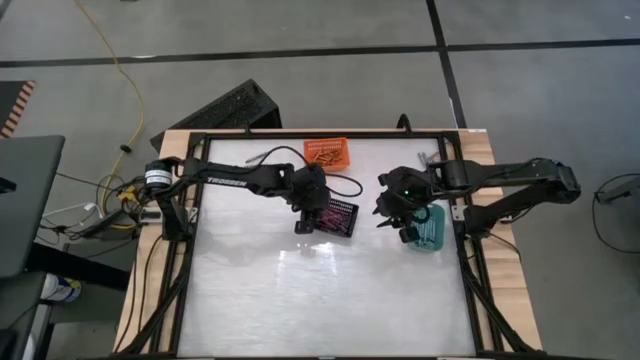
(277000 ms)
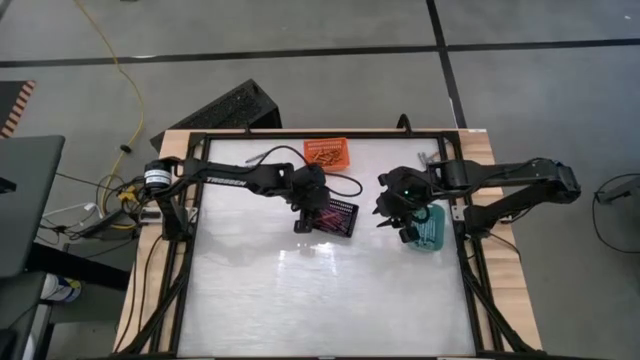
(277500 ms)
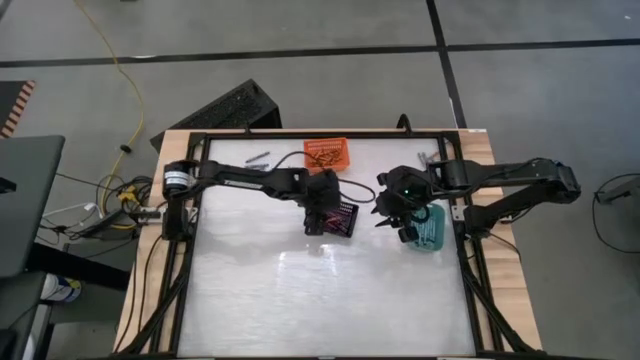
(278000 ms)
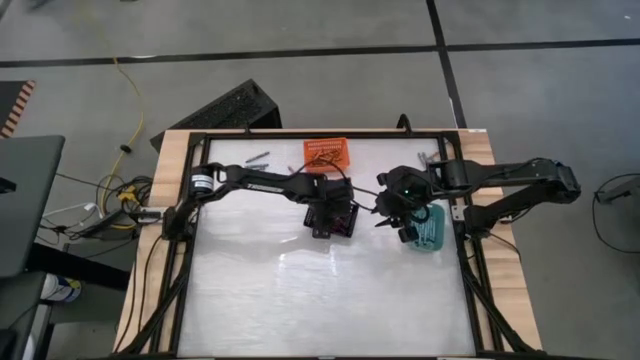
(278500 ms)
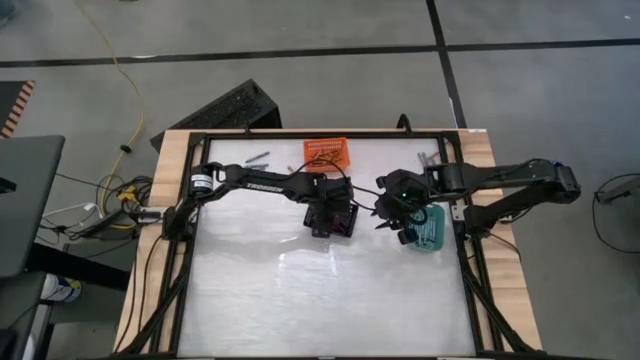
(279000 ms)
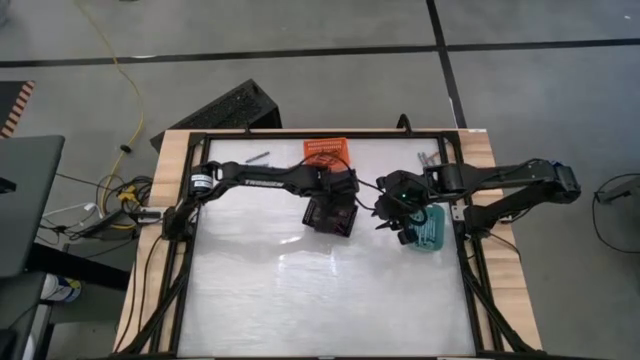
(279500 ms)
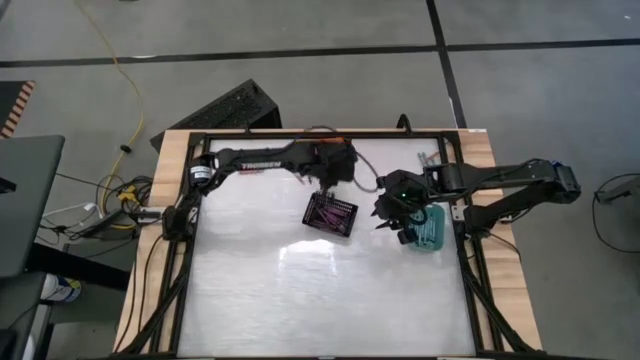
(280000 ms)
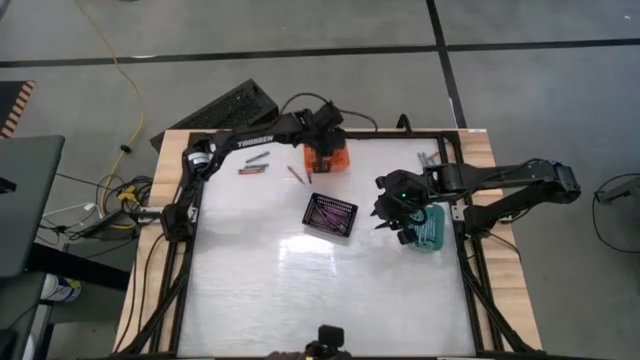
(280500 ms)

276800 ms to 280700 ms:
Task: Sort crayons
Put the orange crayon into the orange bin

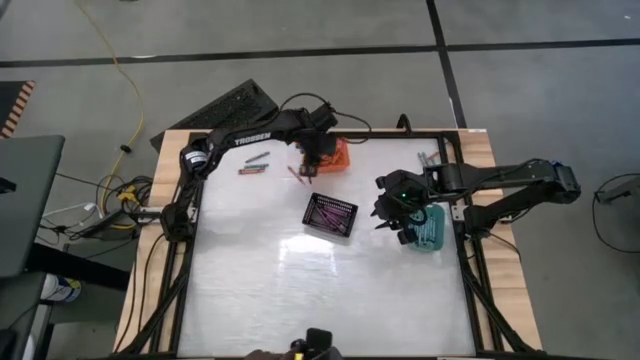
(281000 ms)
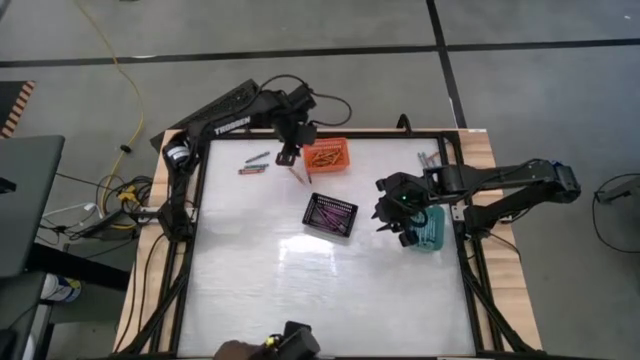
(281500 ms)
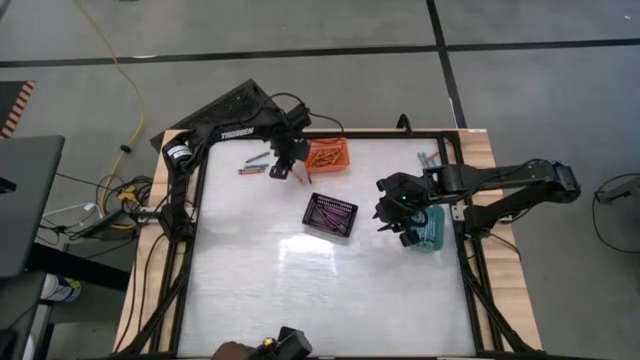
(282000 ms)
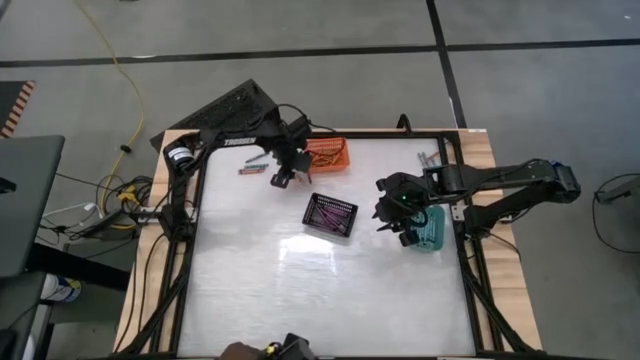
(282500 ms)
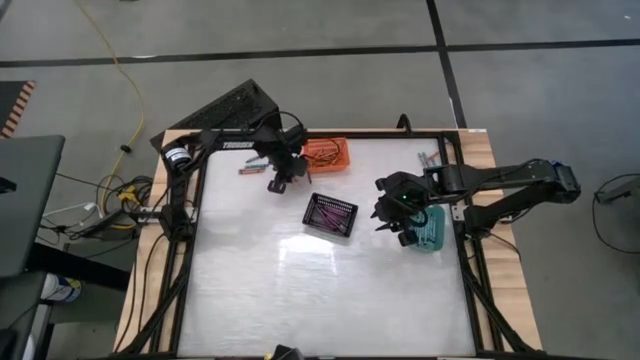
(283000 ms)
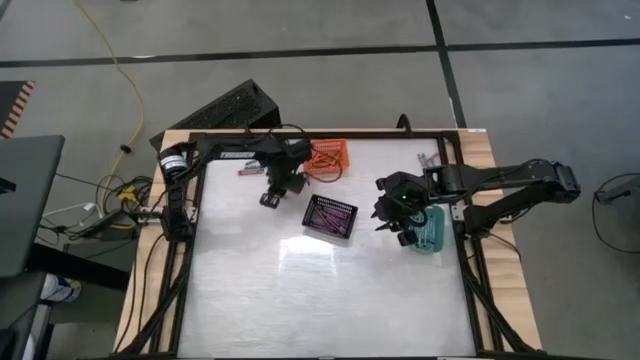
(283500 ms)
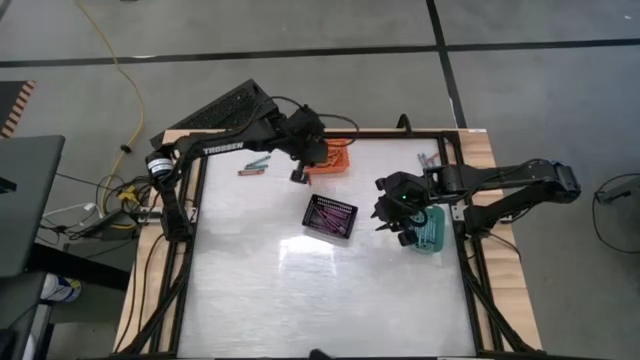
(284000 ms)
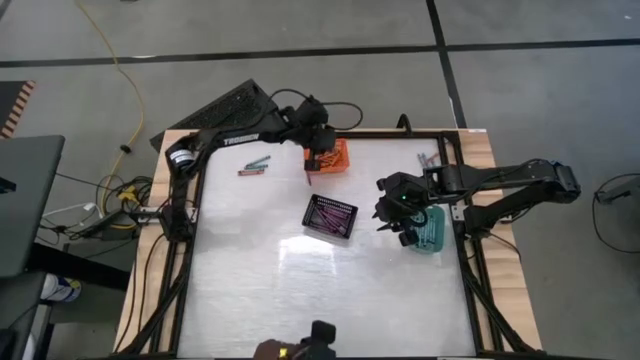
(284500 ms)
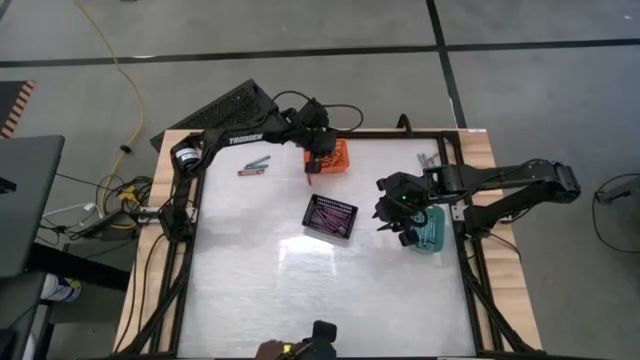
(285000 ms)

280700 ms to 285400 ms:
Put the orange crayon into the orange bin

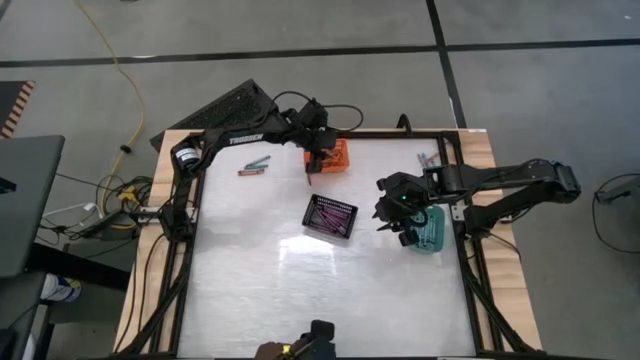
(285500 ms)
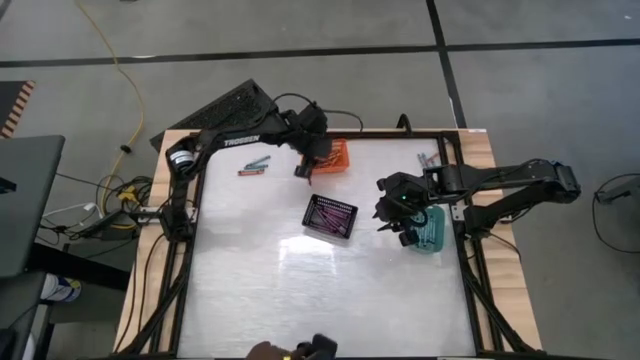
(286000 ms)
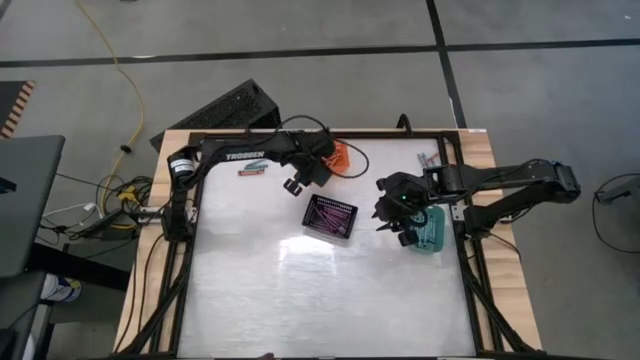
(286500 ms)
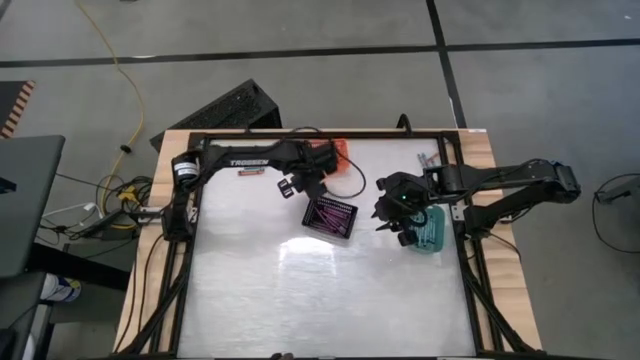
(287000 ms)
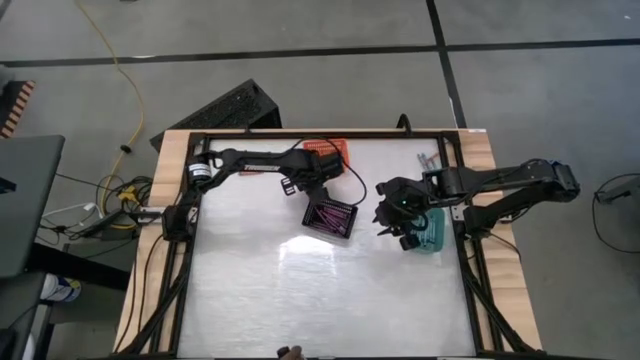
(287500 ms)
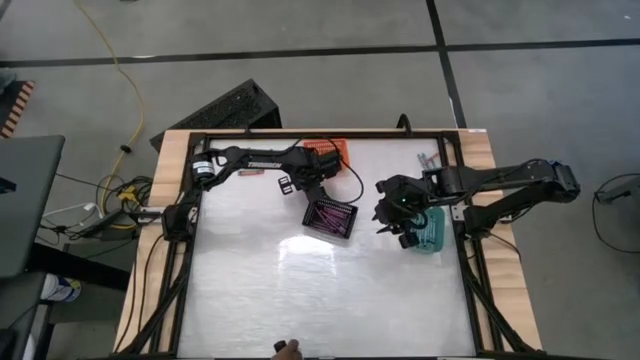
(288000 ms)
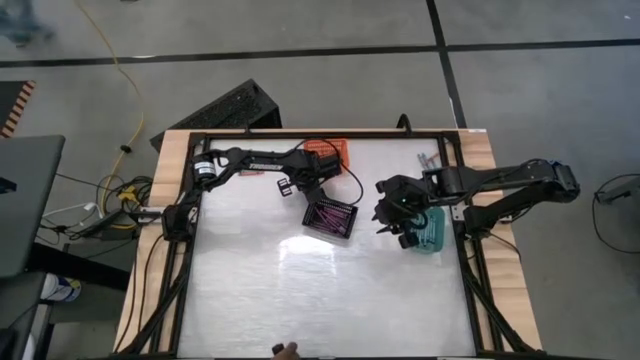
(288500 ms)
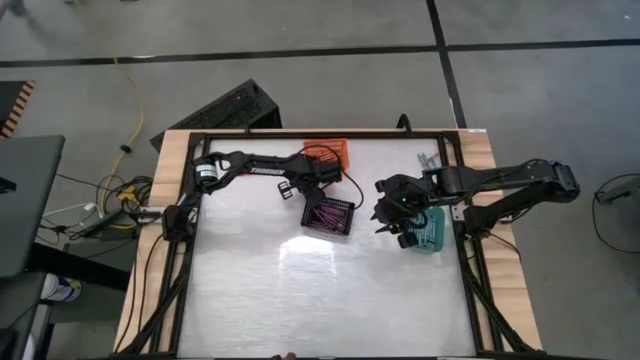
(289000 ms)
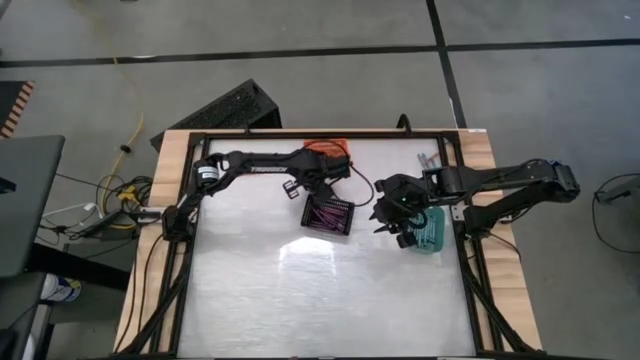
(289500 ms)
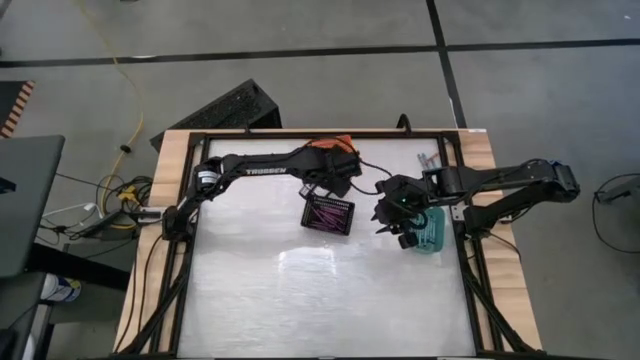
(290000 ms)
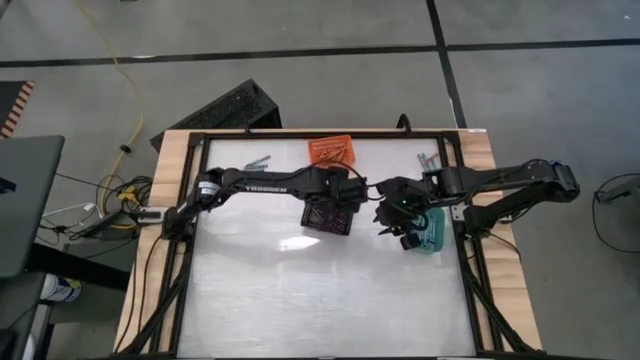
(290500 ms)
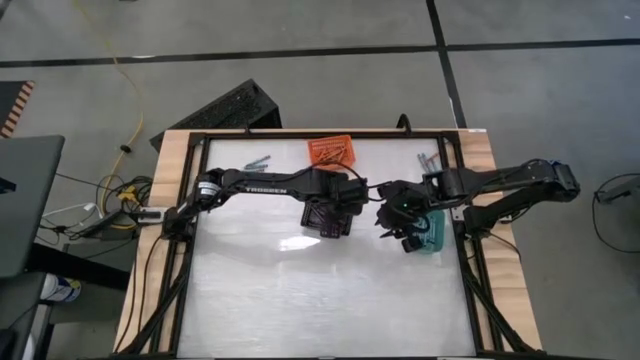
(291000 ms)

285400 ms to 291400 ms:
Put the violet crayon into the black bin

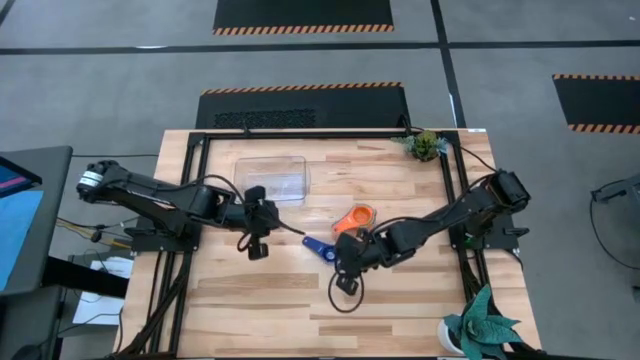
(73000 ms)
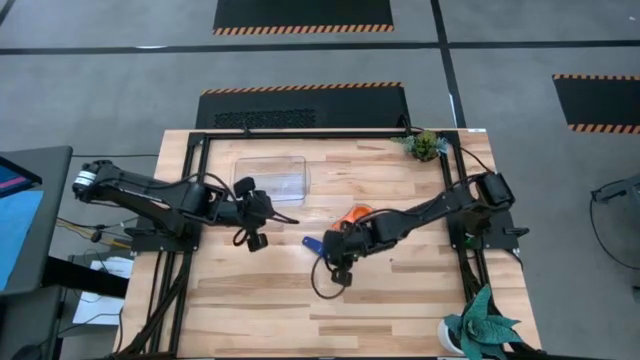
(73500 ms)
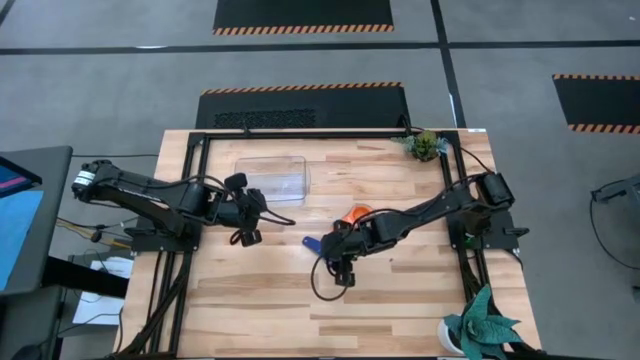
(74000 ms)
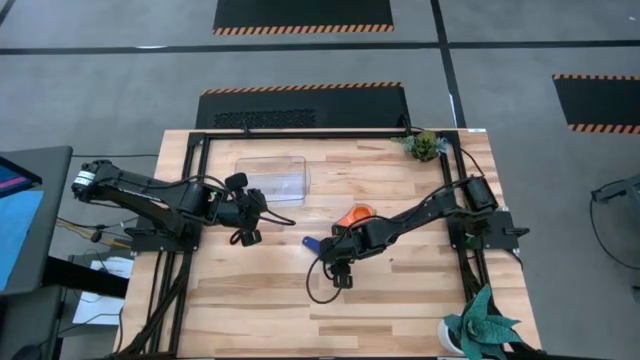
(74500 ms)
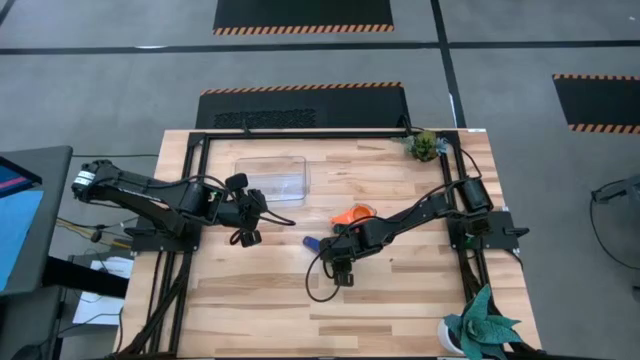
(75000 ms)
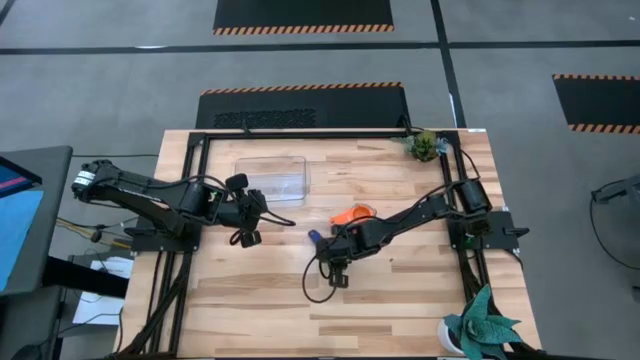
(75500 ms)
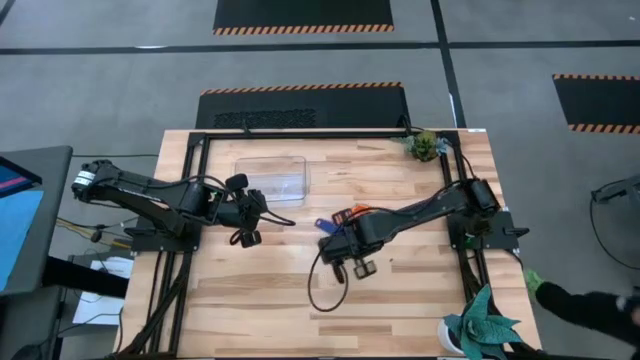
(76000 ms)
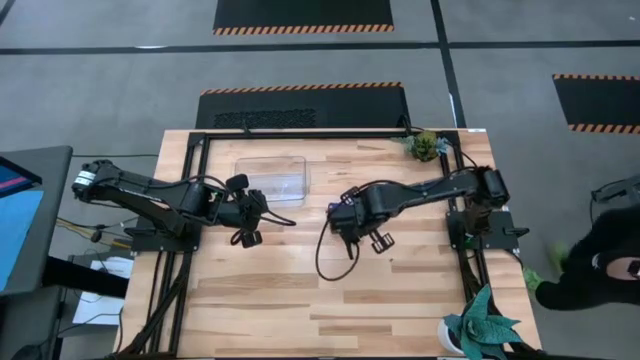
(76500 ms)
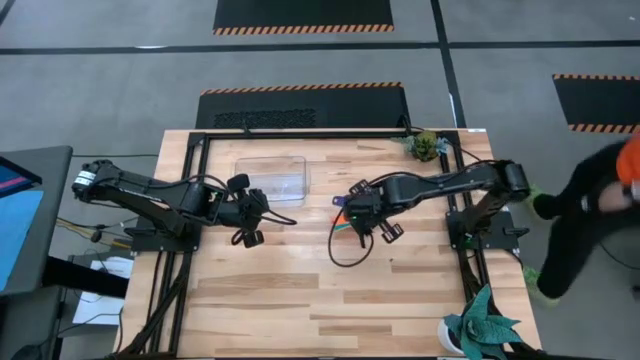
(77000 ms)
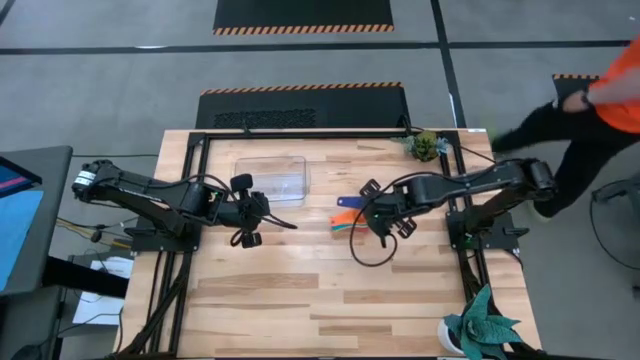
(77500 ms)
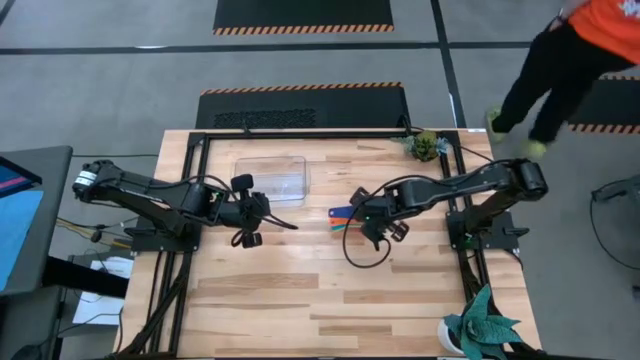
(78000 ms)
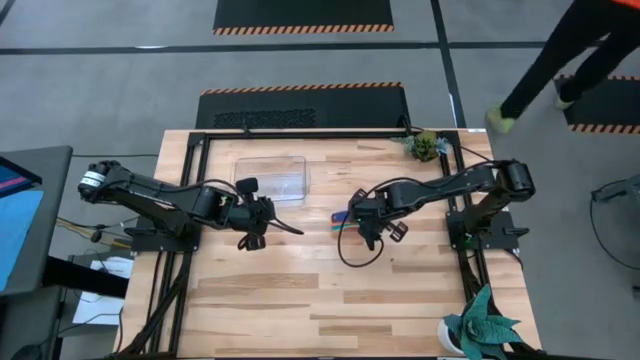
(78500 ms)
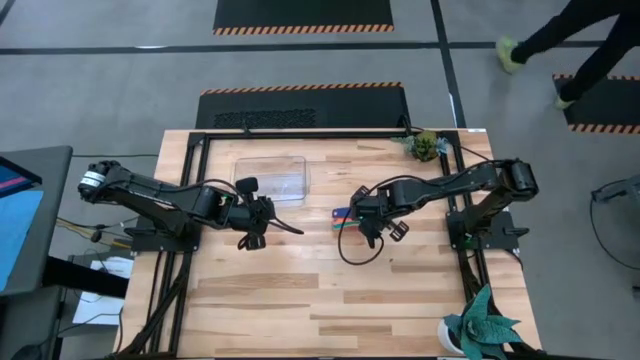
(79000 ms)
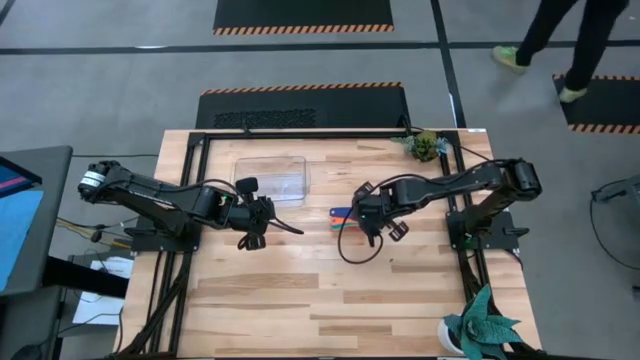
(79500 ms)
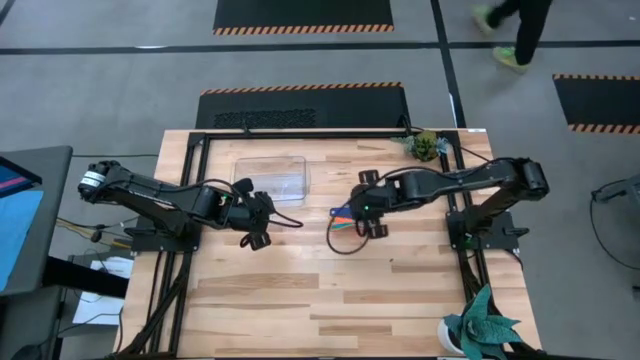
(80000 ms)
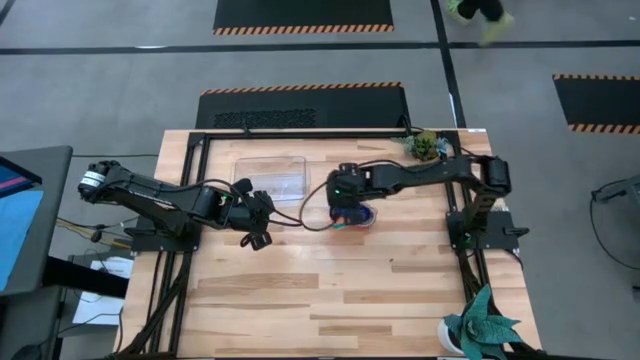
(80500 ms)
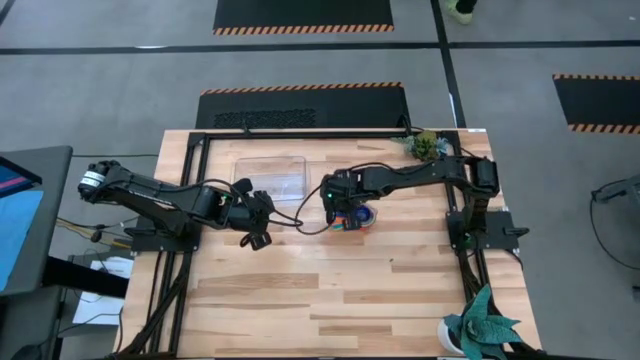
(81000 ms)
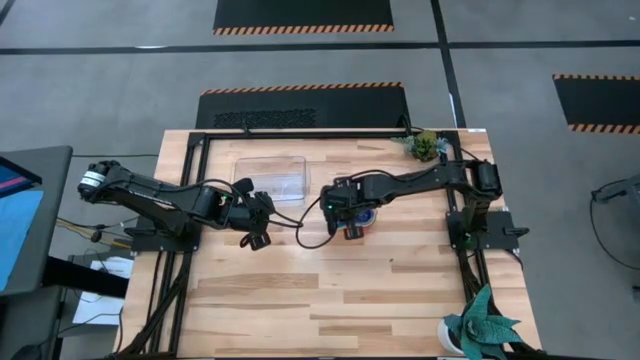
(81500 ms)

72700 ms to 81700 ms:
Task: Nest measuring cups in basket
Stack the dark blue measuring cup on top of the orange measuring cup
